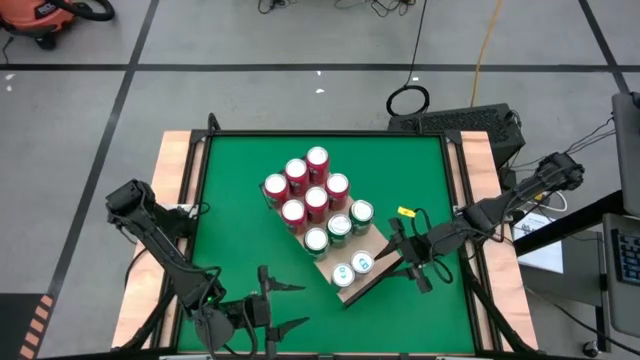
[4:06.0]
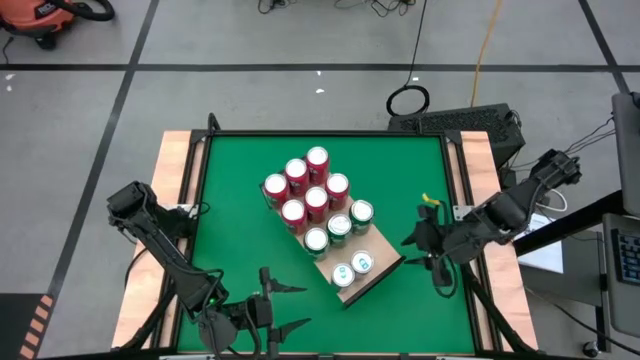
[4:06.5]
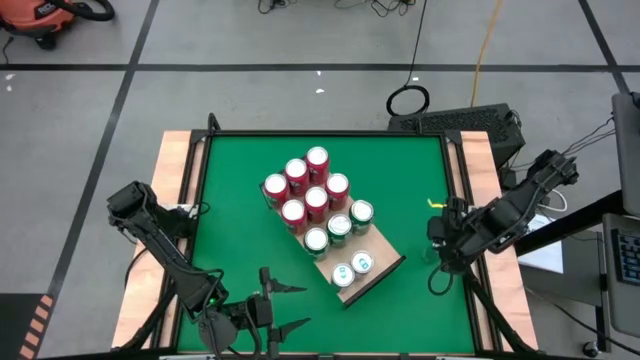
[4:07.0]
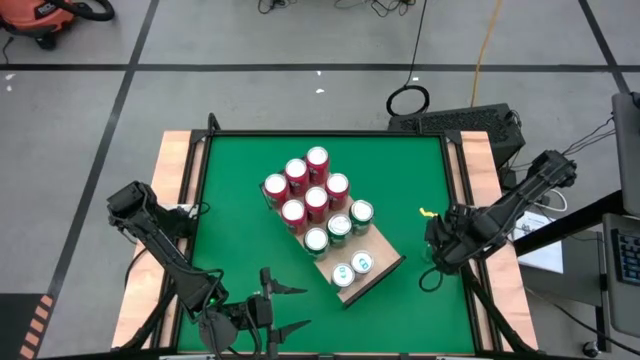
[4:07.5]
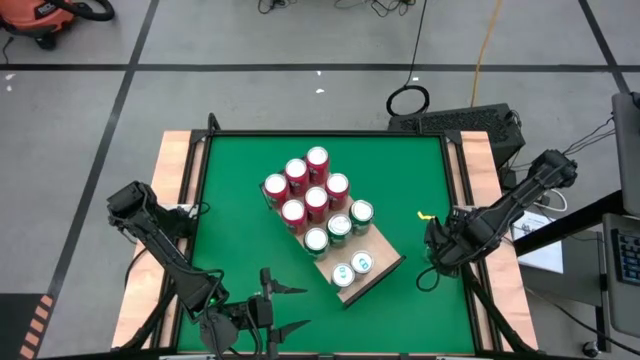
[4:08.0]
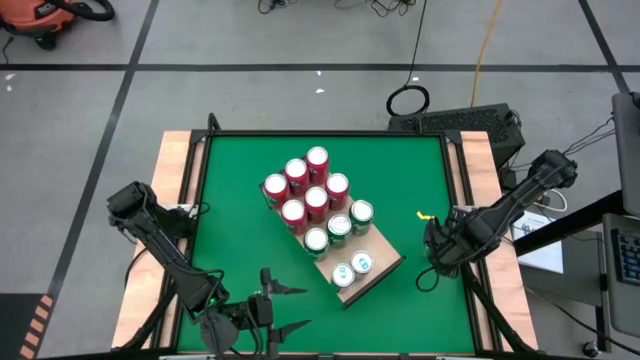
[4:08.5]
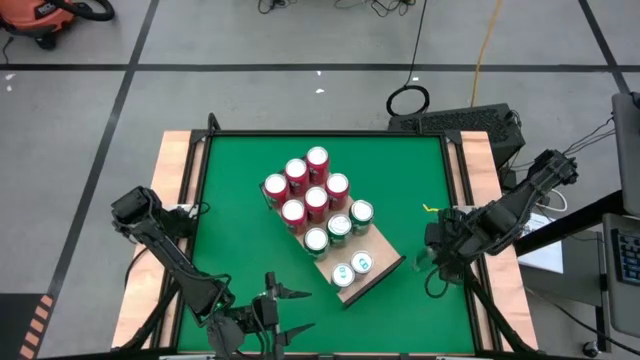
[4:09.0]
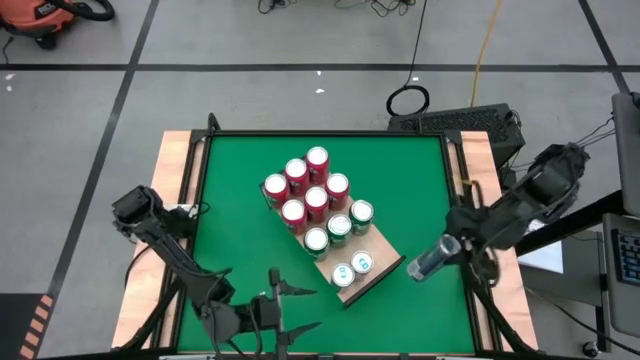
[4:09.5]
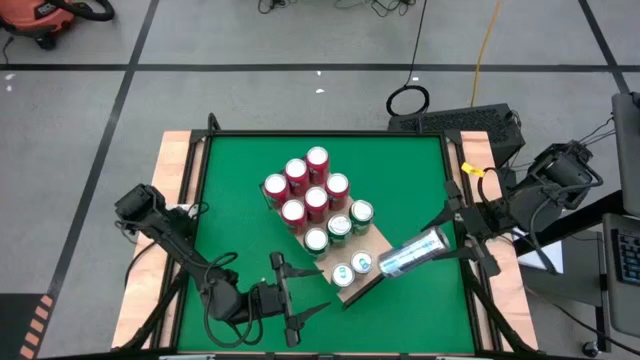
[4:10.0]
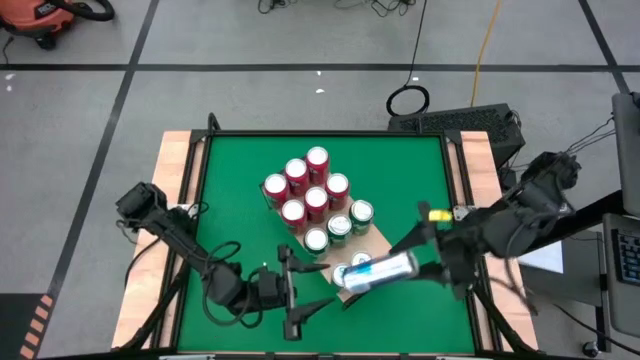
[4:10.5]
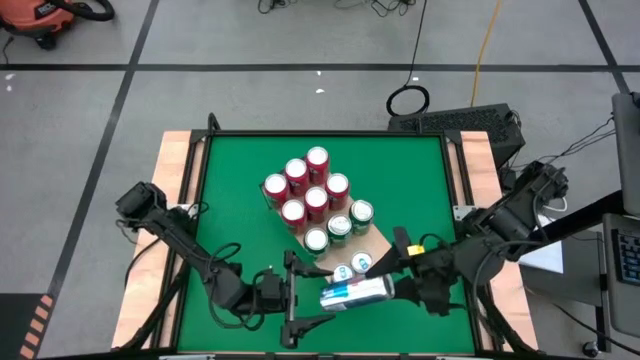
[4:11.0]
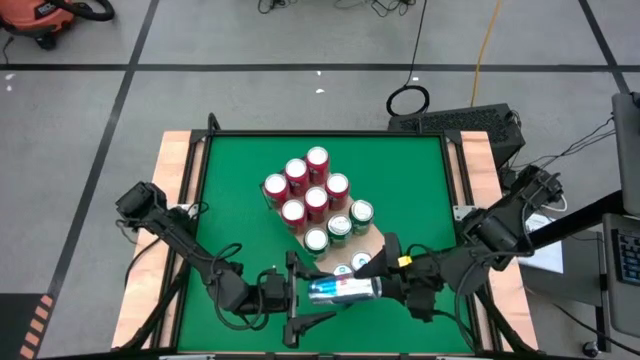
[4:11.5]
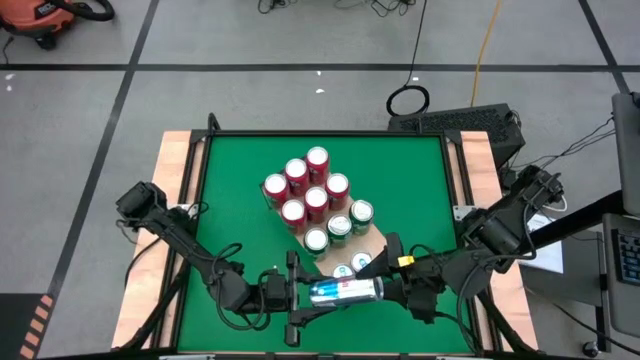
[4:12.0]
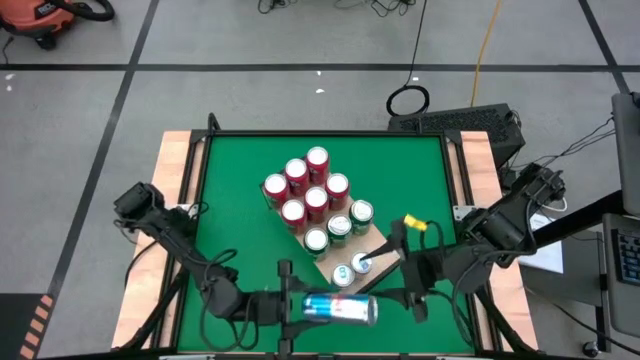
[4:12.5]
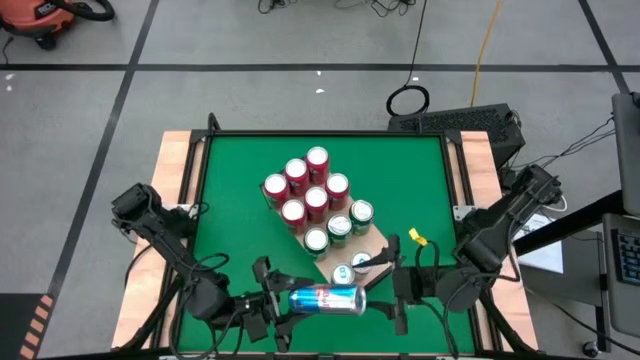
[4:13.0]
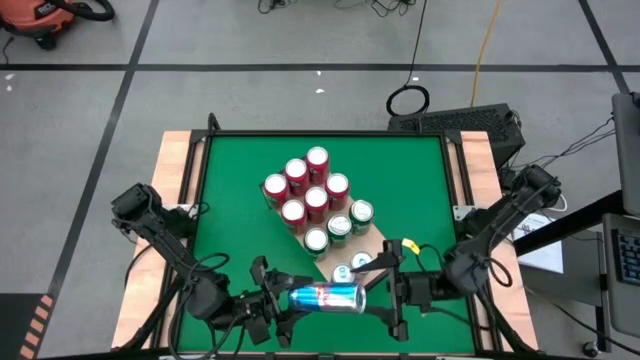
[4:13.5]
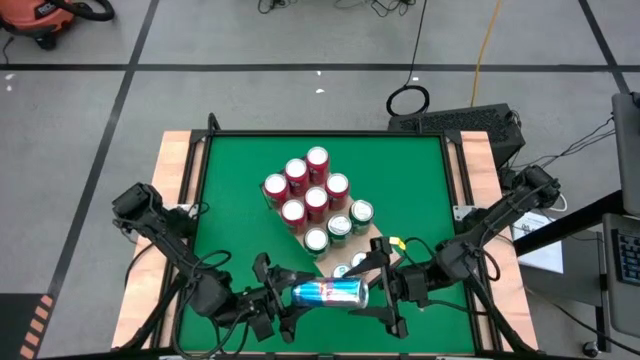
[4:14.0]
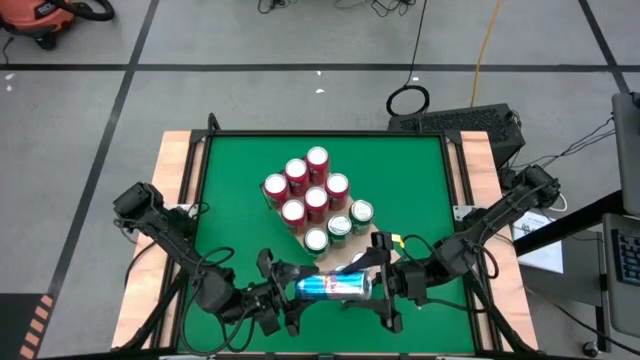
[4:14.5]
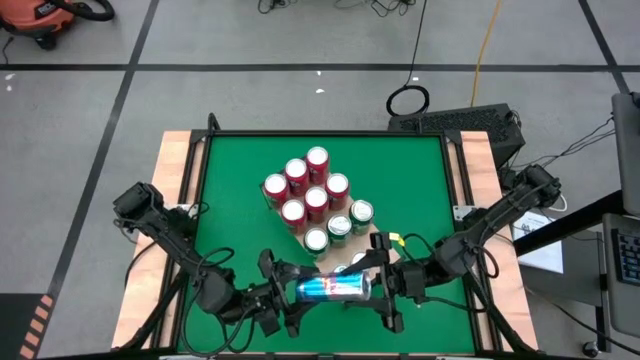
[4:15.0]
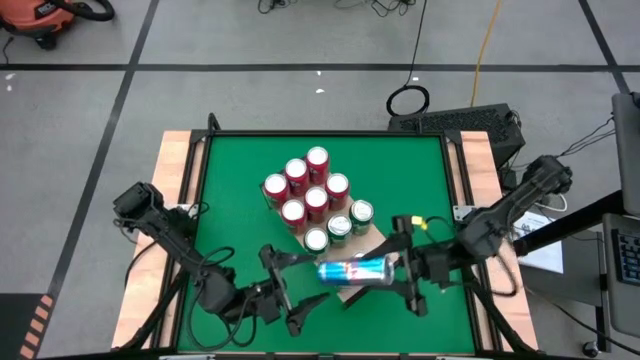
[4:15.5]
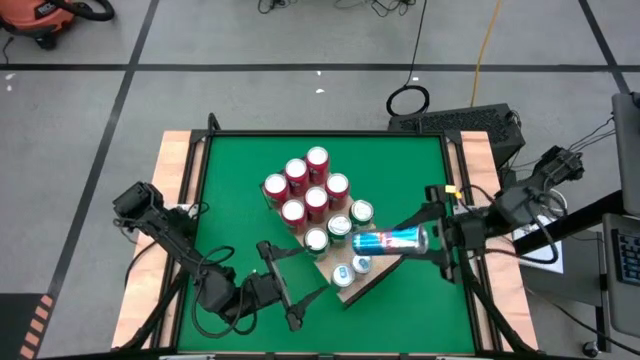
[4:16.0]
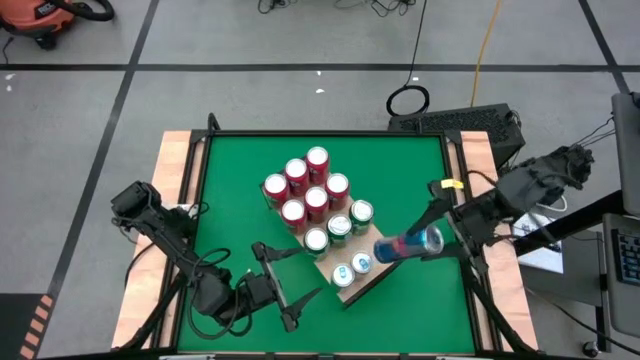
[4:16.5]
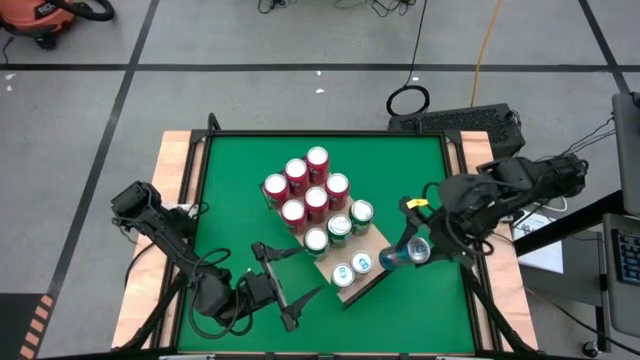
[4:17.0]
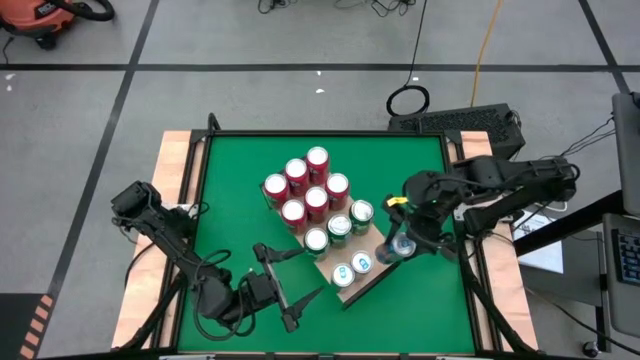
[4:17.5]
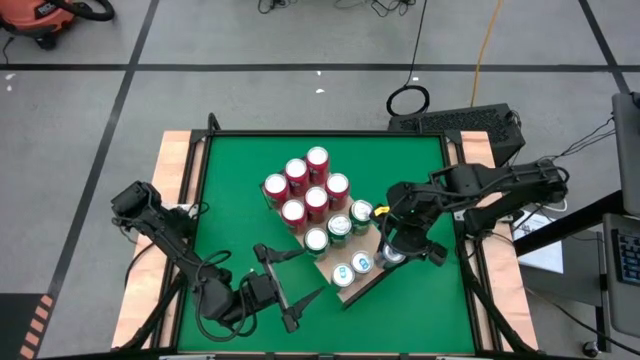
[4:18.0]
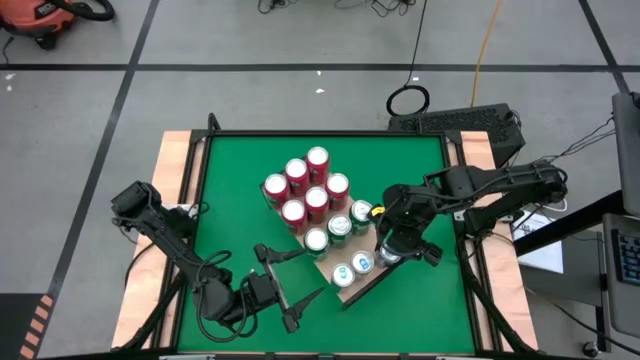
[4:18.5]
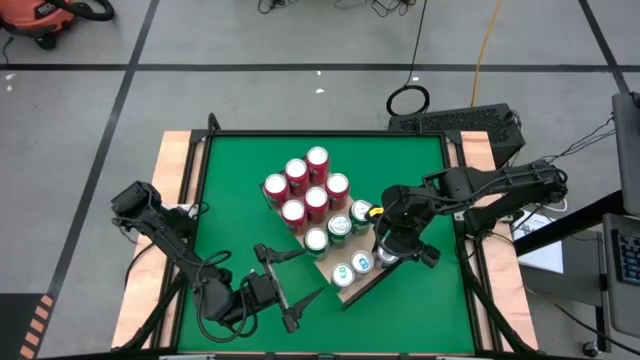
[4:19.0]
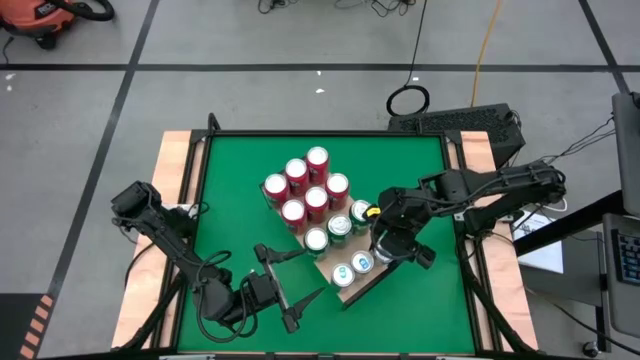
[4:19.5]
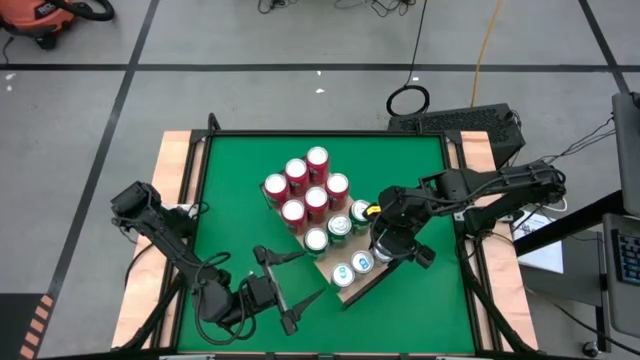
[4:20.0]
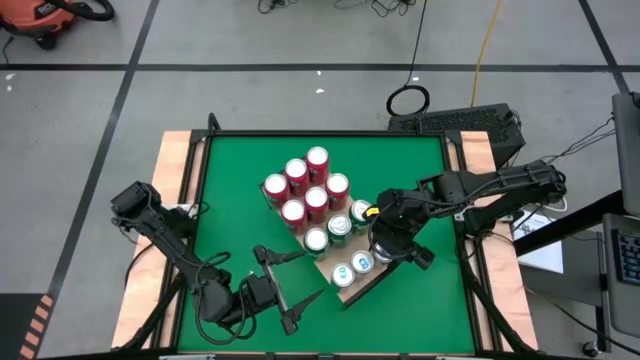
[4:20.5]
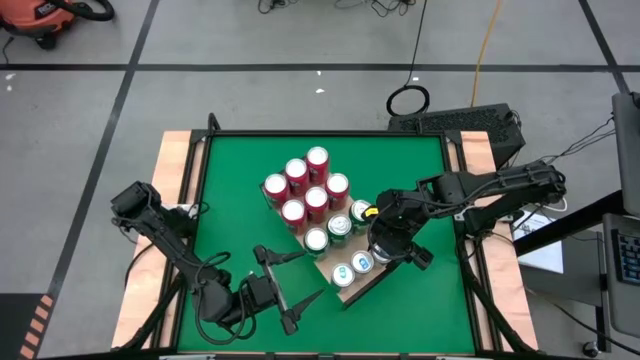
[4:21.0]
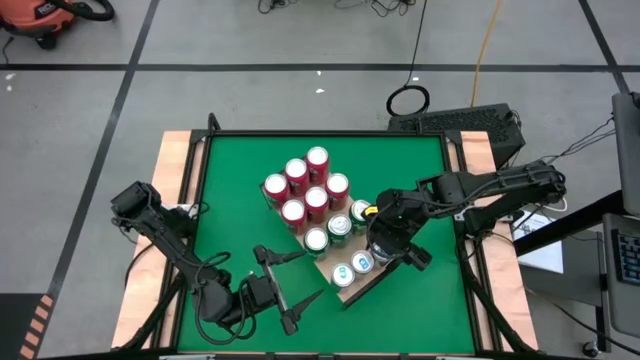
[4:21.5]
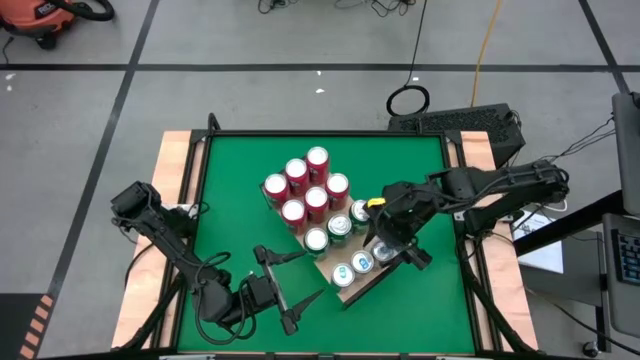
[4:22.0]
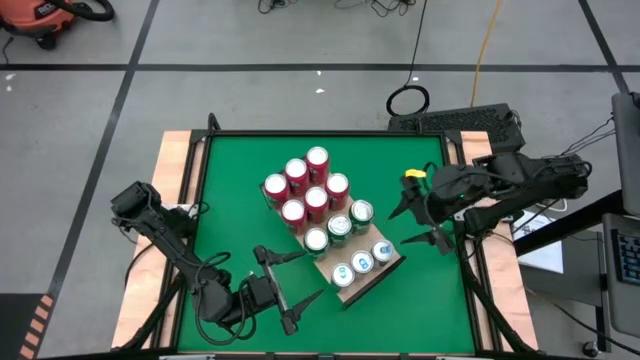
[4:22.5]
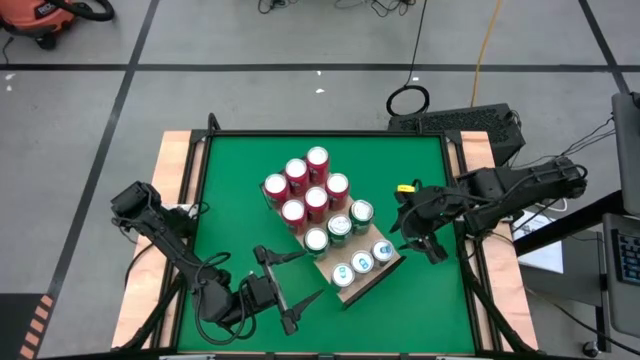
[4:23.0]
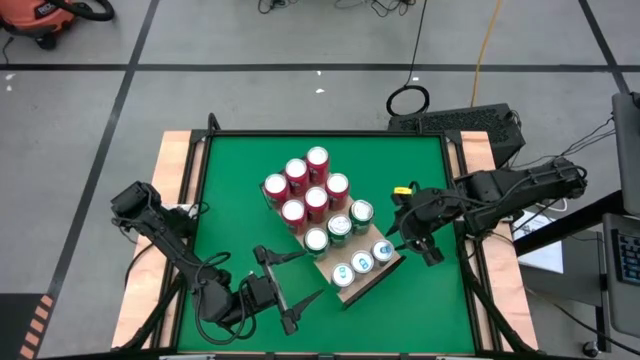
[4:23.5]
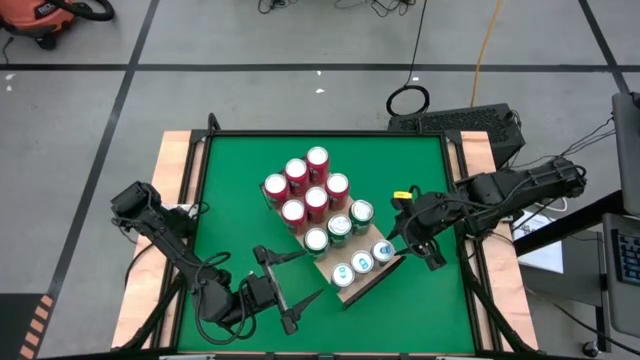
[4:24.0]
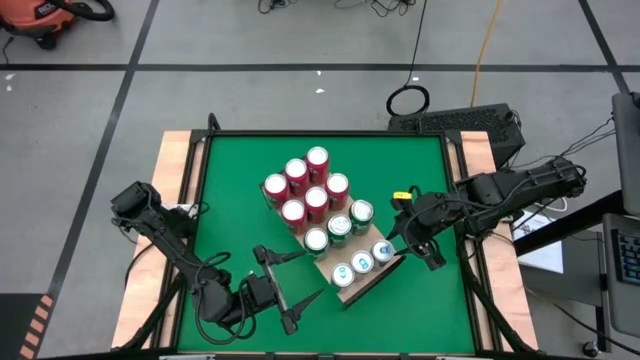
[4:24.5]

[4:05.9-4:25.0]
Task: Place canned beverage on shelf
Put the blue soda can on the shelf aligned with the other blue soda can

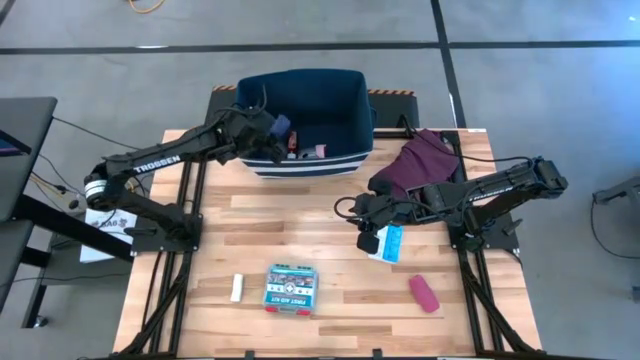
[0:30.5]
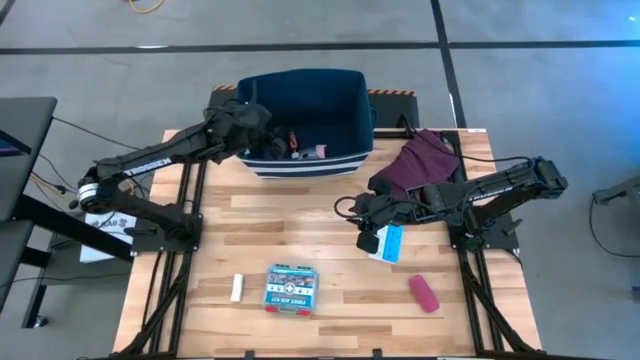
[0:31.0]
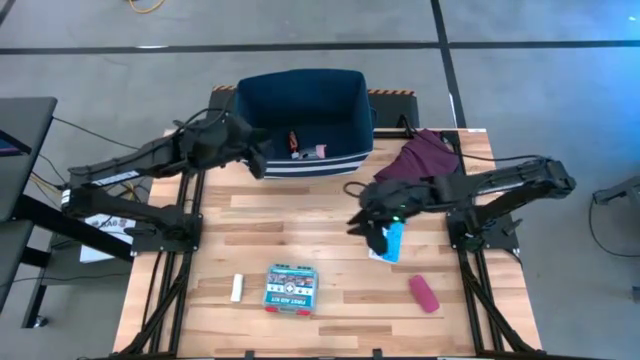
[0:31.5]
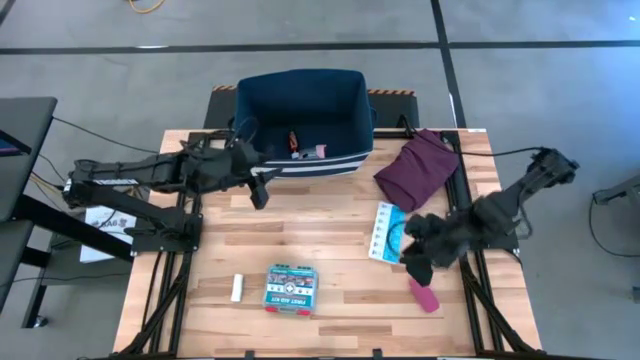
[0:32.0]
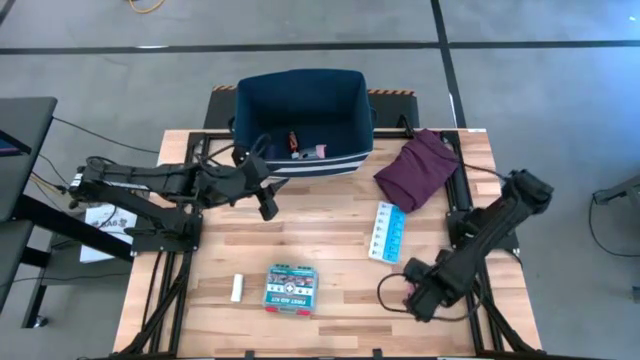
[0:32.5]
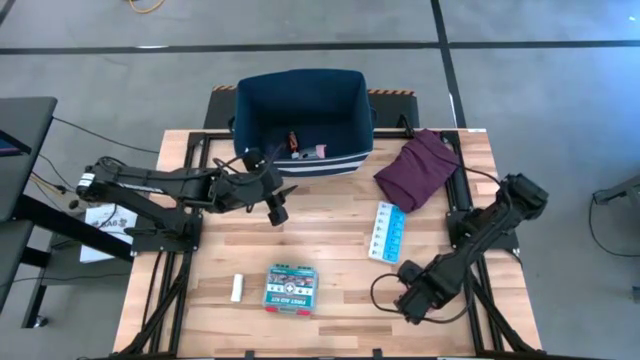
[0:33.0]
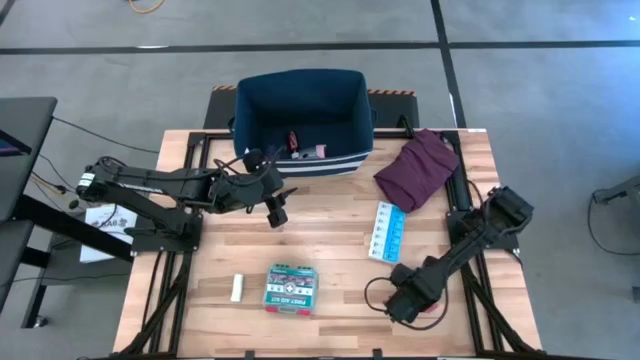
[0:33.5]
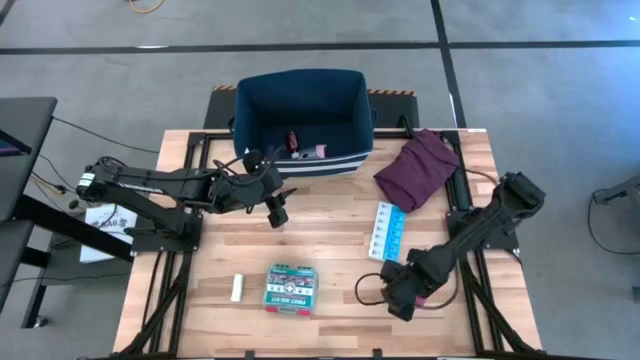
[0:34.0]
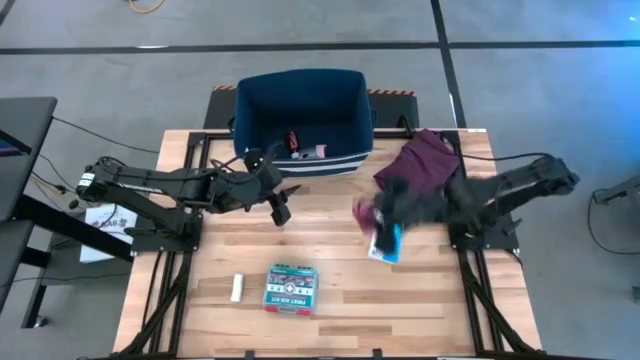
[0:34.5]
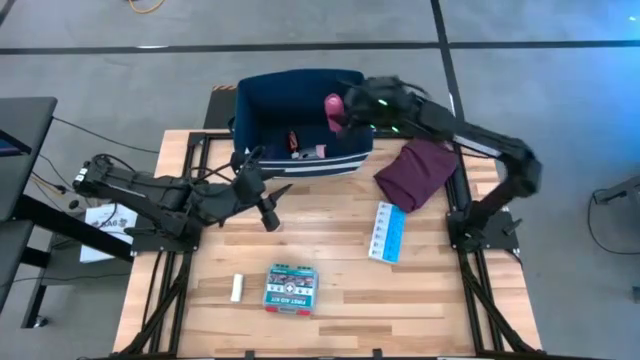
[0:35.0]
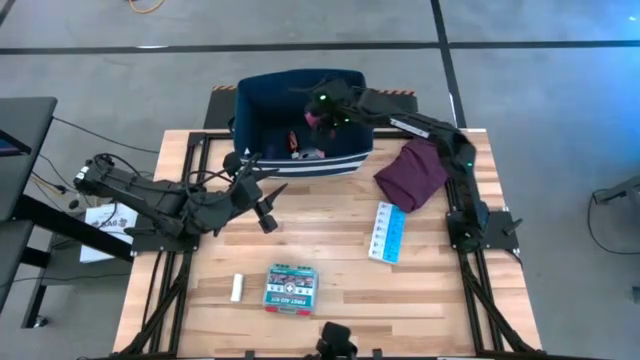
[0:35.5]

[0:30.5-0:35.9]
Task: Pick & place medical supplies in basket/bin
Put the pink bandage into the blue bin
